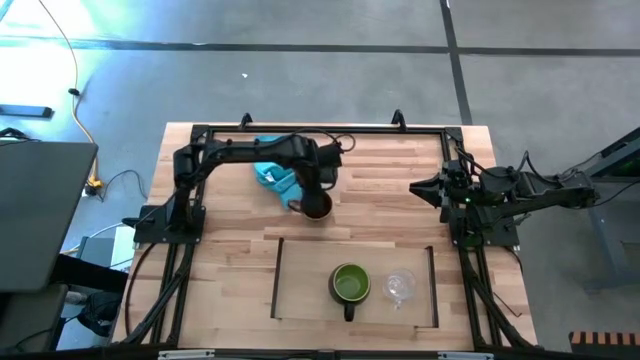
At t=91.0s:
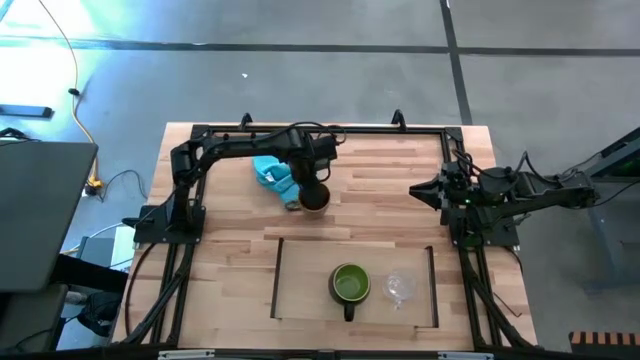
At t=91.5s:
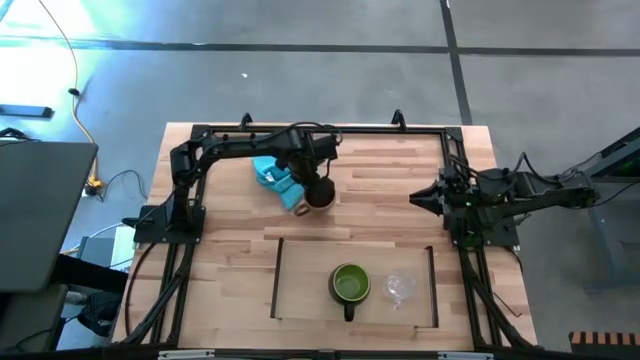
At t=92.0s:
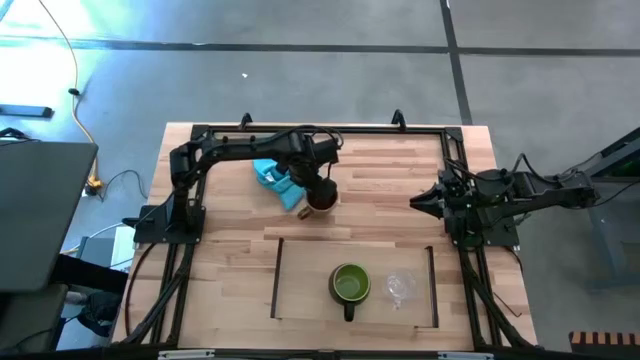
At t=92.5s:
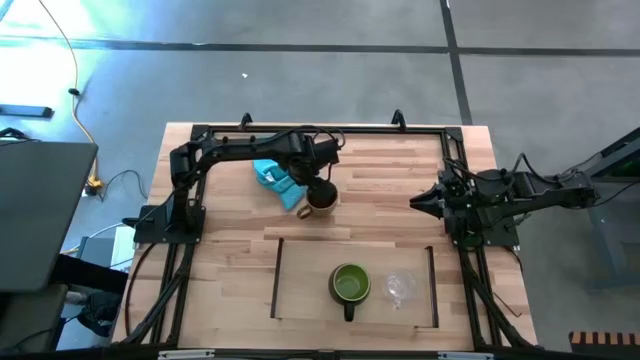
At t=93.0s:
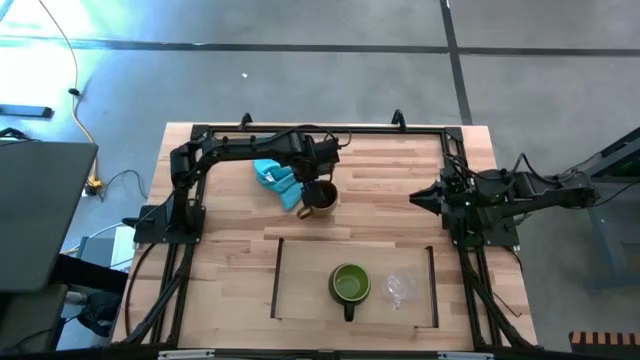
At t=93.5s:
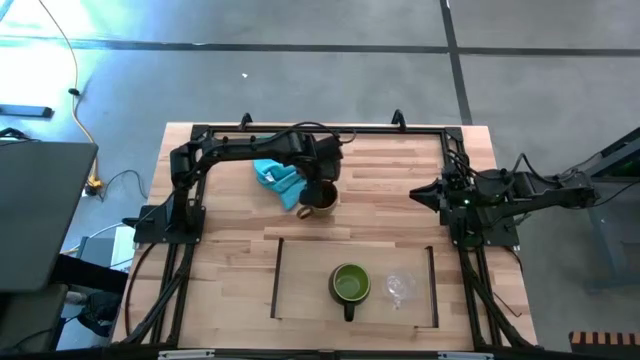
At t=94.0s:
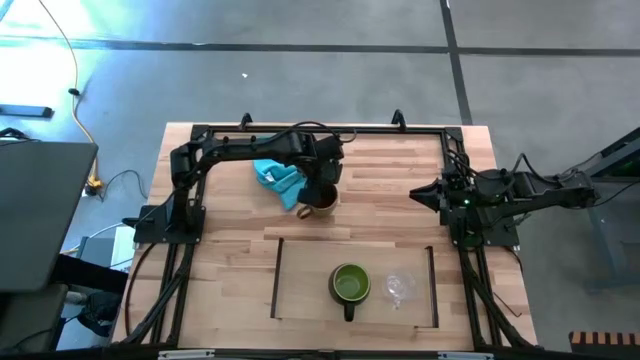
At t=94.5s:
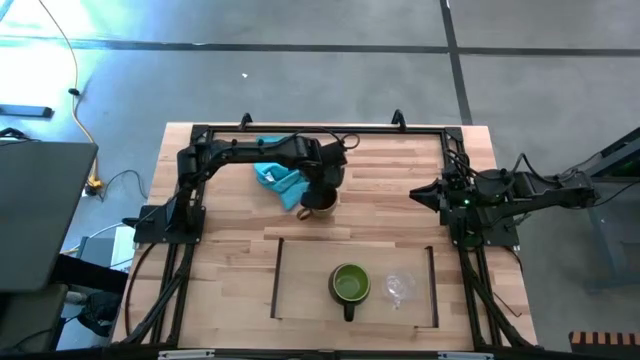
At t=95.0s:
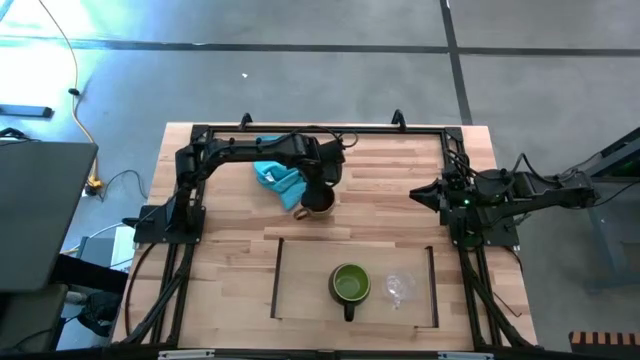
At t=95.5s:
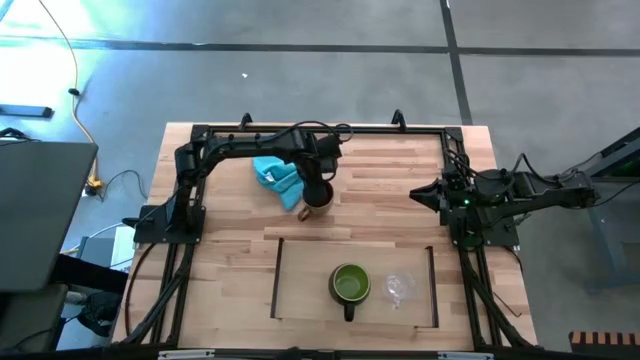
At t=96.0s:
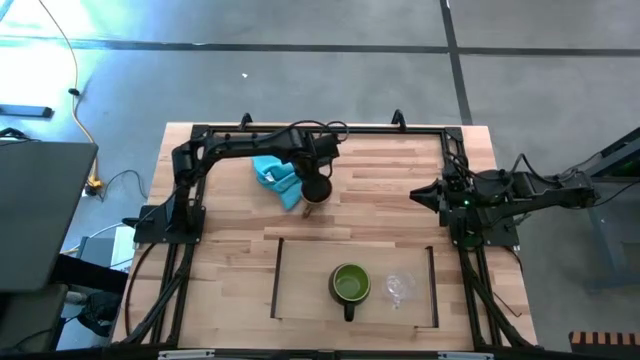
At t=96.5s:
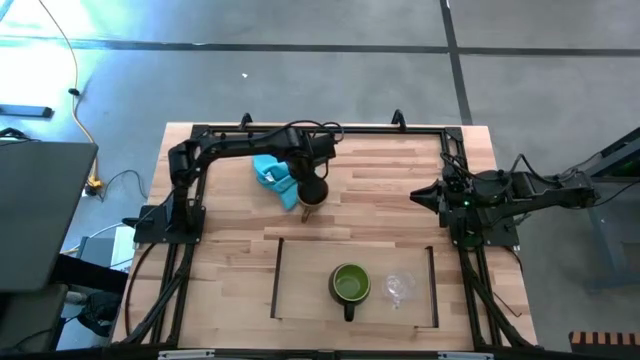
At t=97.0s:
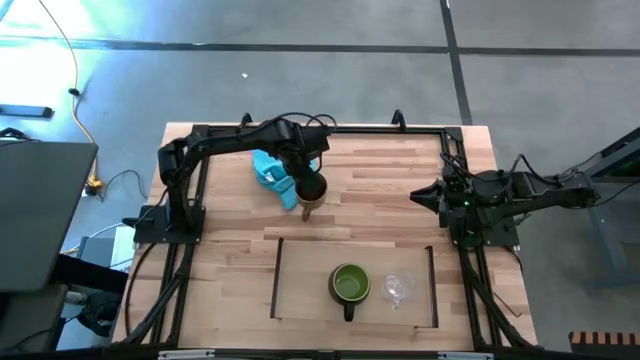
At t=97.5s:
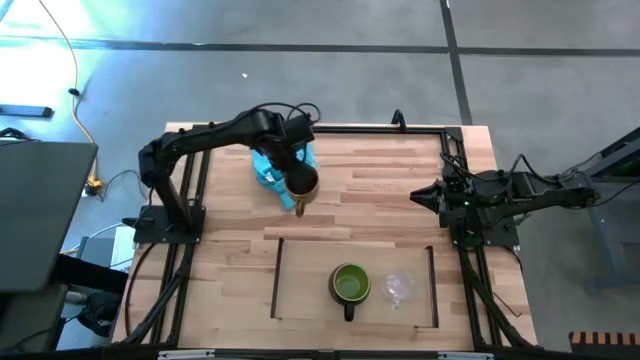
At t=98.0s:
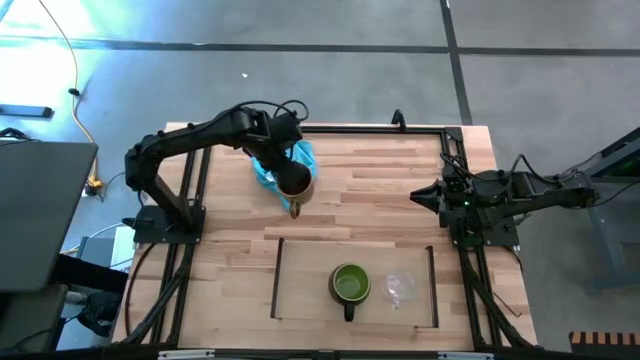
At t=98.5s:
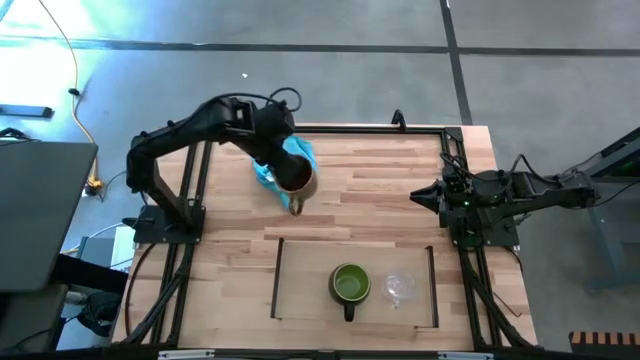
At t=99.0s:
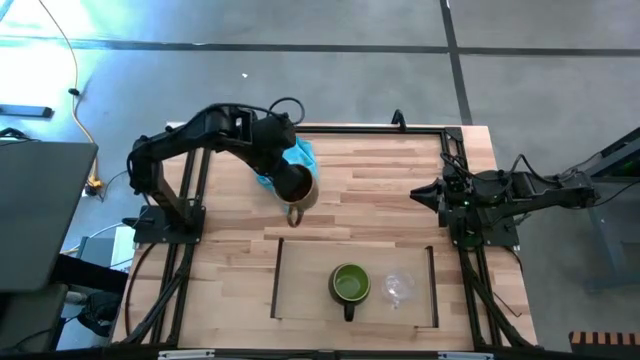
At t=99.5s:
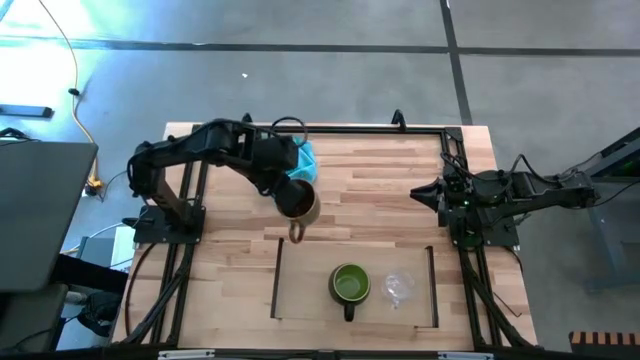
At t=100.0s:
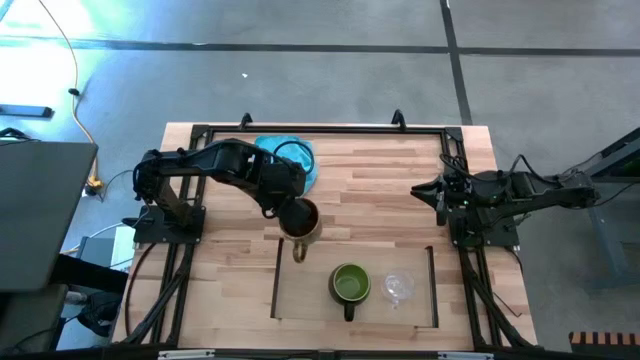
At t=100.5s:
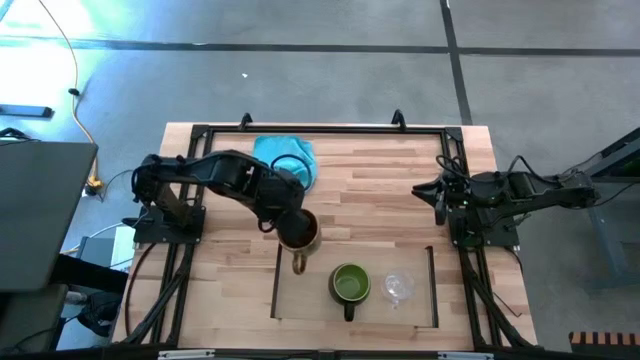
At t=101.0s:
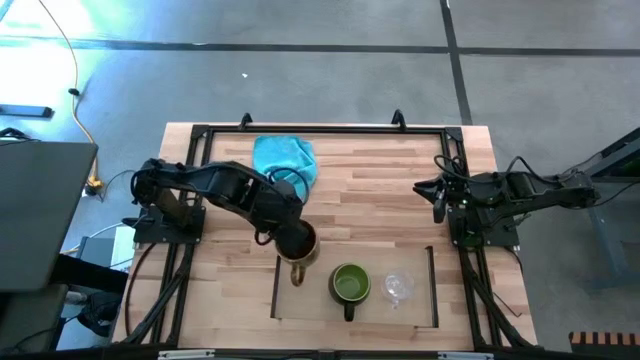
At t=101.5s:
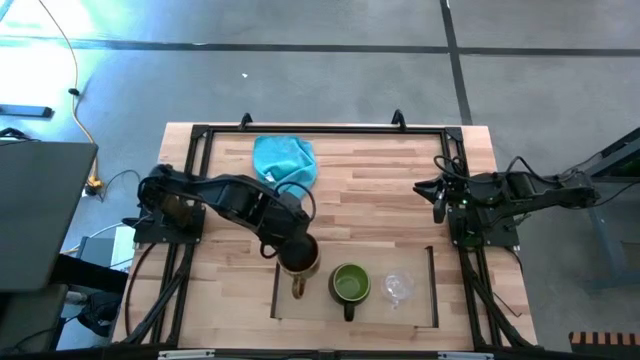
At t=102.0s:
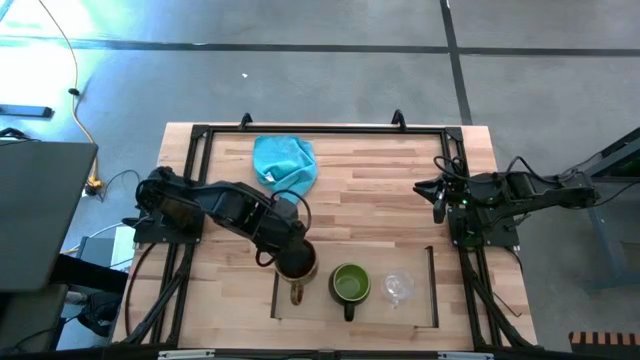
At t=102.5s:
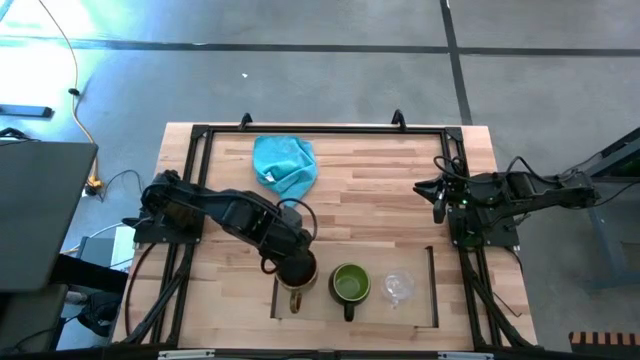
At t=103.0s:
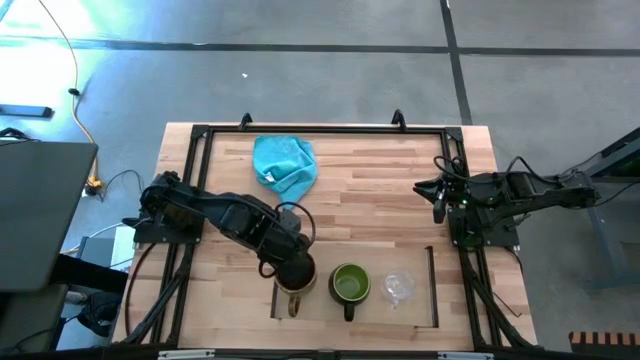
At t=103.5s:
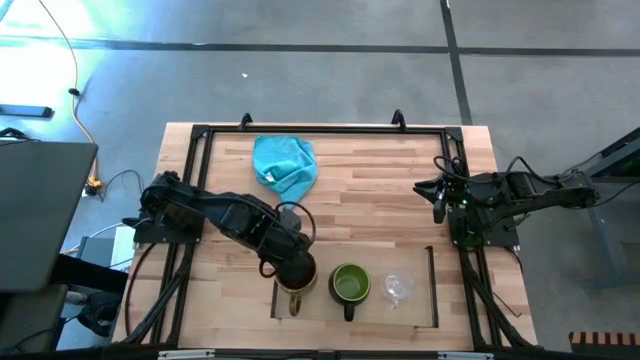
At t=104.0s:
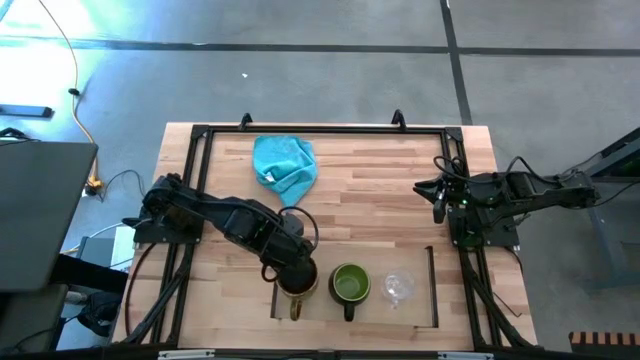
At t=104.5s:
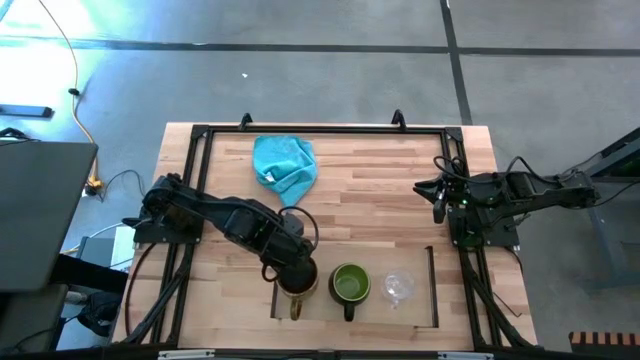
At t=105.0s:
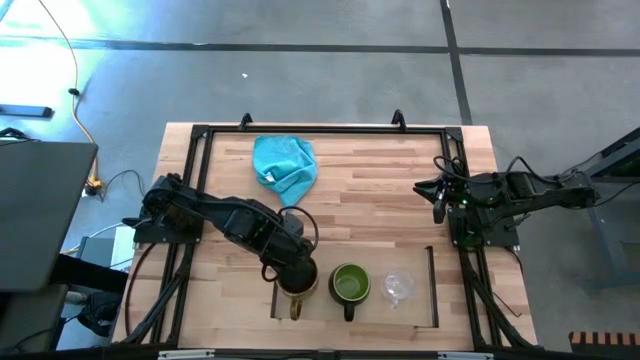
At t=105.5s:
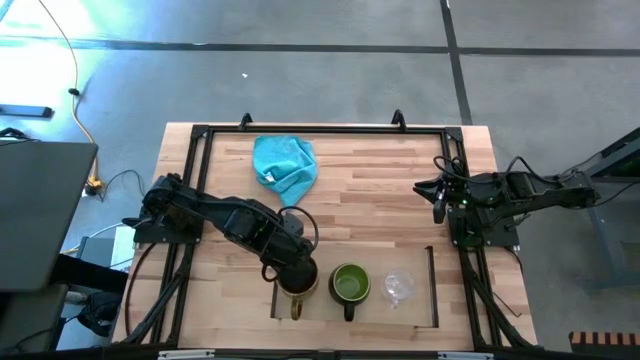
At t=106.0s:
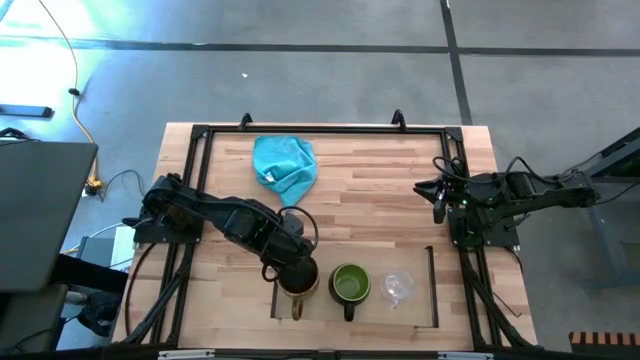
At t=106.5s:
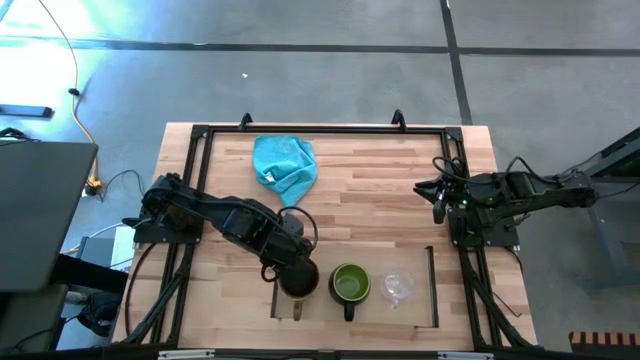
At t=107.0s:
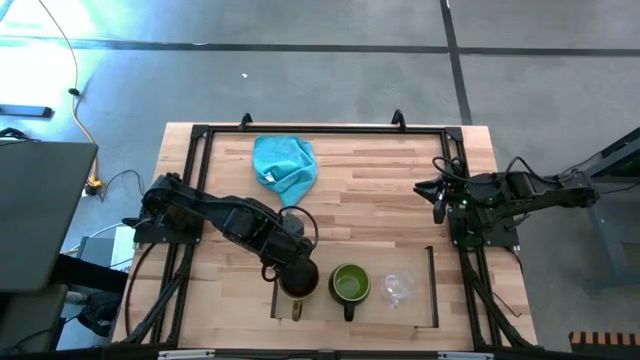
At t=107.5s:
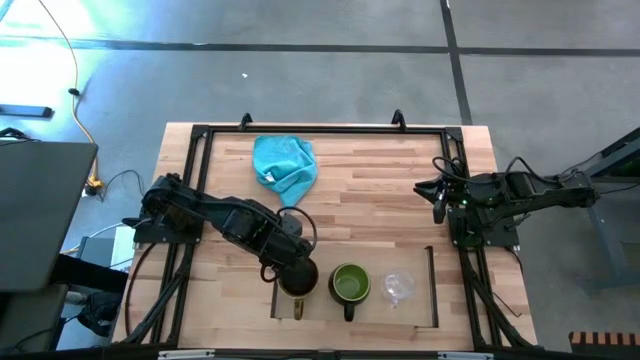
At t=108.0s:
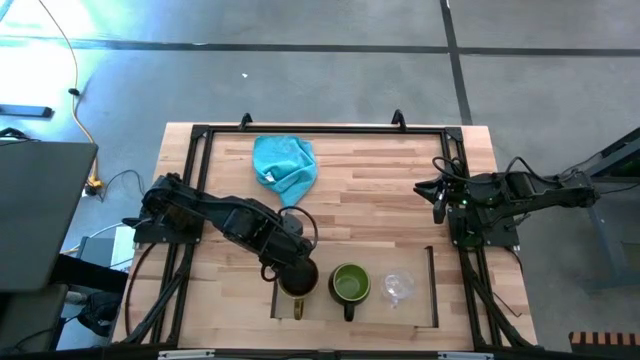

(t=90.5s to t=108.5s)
Task: Stack small to large cups/mugs on shelf
Put the brown mug on the shelf

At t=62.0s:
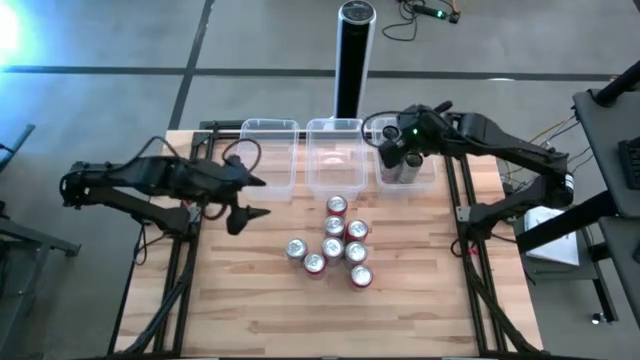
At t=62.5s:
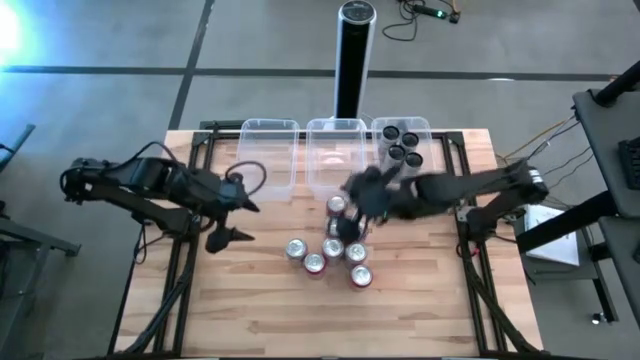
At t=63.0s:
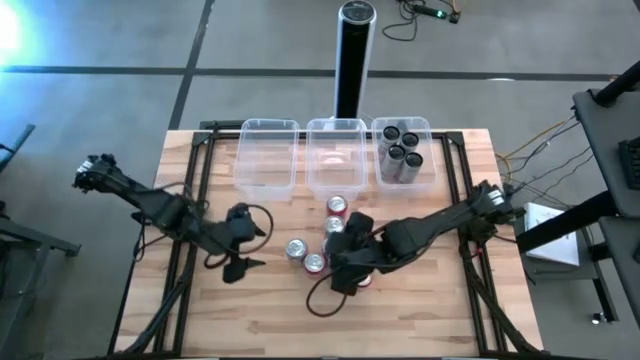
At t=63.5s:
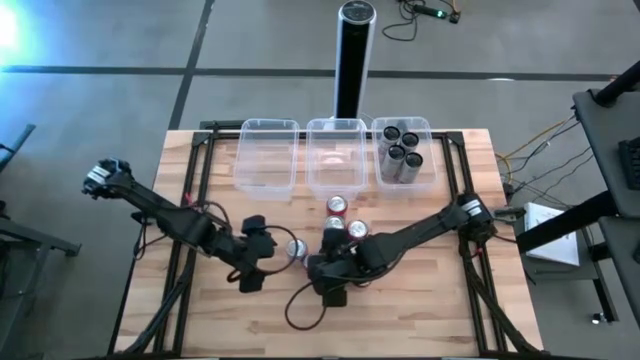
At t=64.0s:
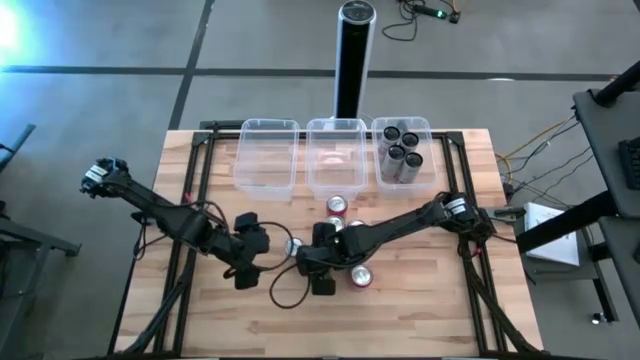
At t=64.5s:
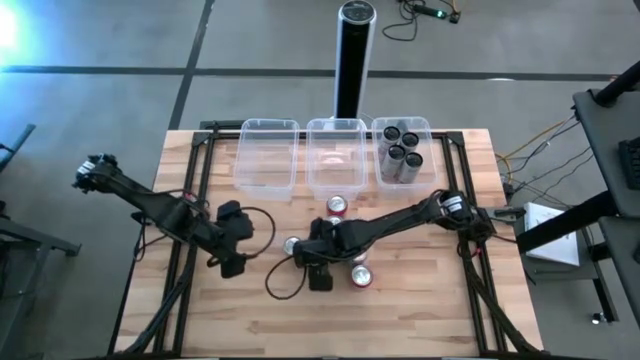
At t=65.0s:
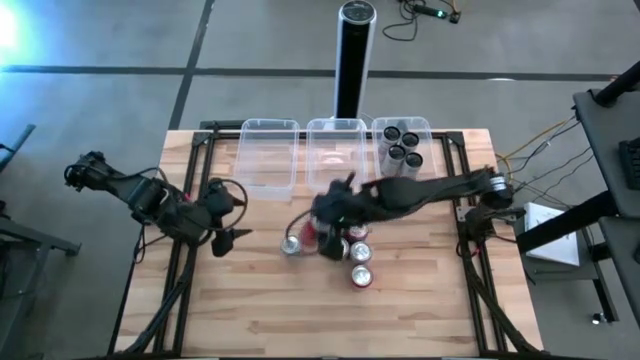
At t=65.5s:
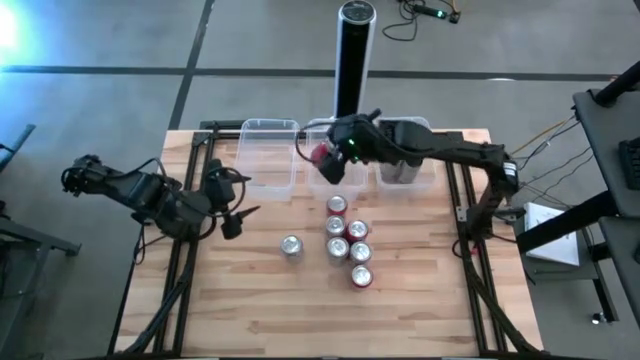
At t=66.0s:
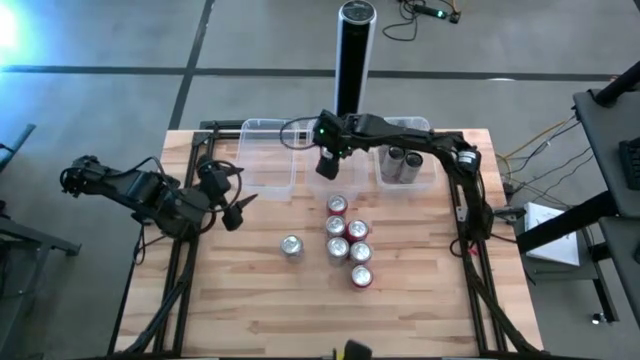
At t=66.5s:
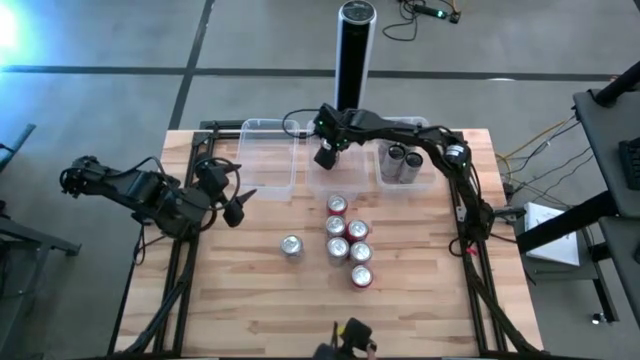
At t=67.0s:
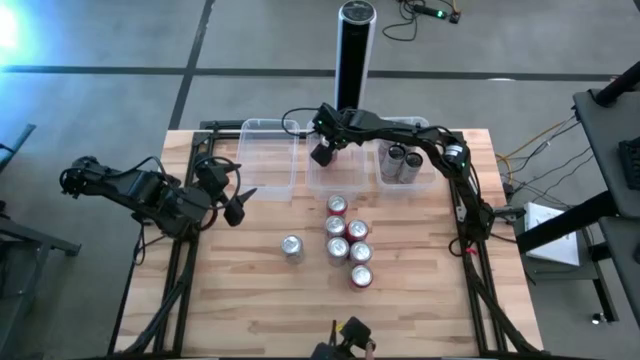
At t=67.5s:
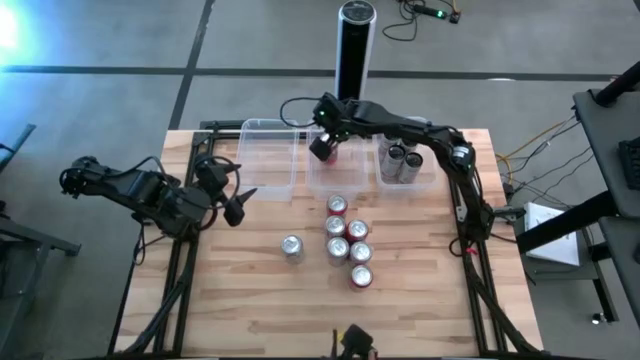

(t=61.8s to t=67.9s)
Task: Sort soda cans
Put the red soda can into the middle white bin
